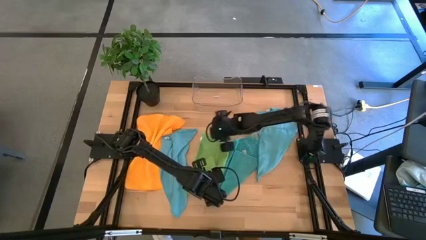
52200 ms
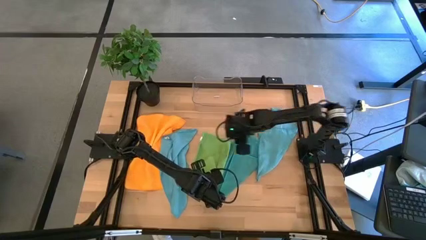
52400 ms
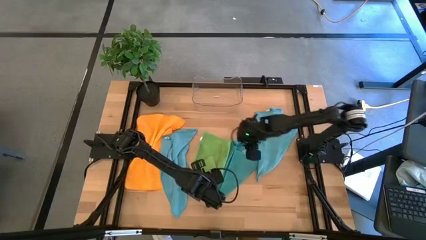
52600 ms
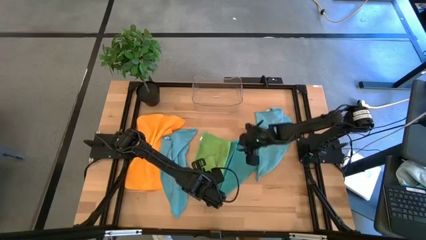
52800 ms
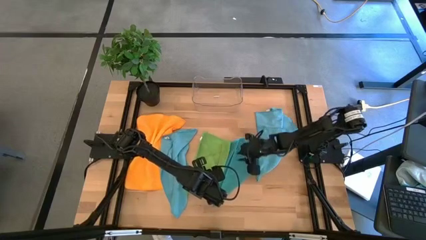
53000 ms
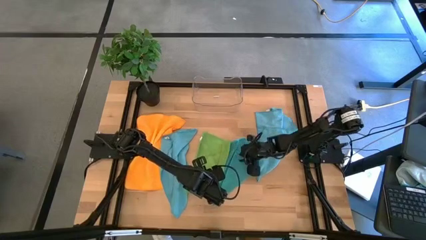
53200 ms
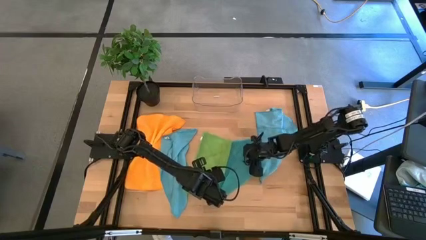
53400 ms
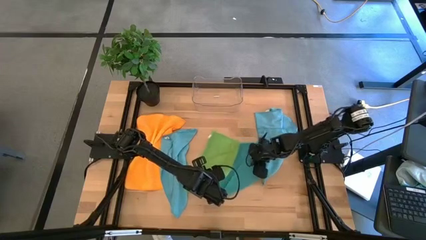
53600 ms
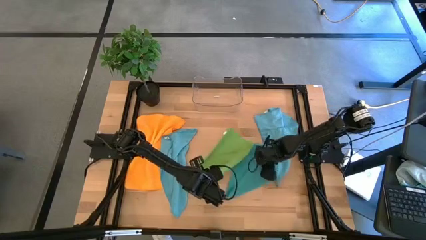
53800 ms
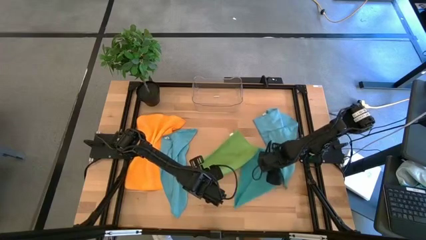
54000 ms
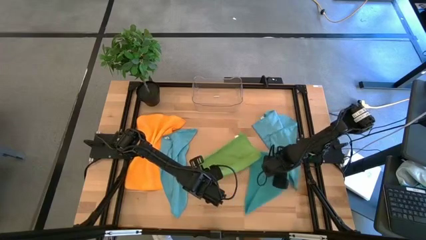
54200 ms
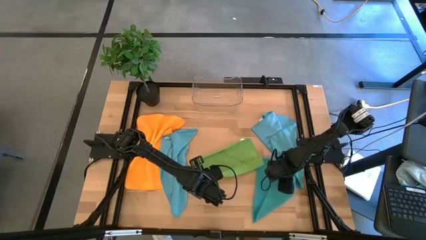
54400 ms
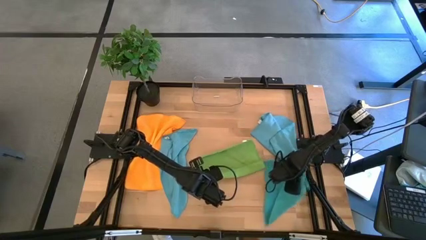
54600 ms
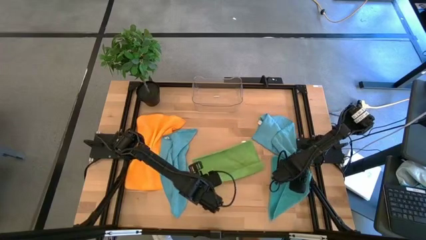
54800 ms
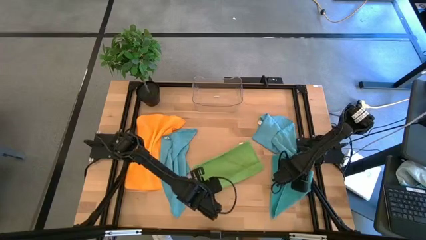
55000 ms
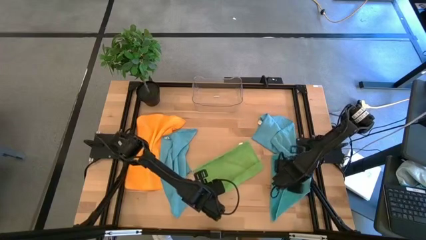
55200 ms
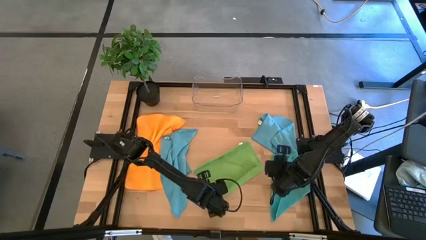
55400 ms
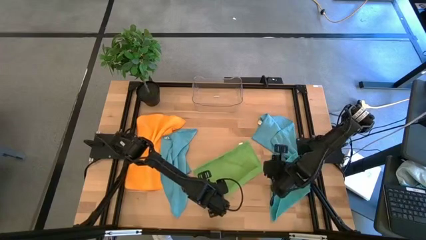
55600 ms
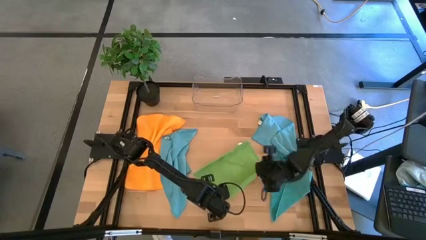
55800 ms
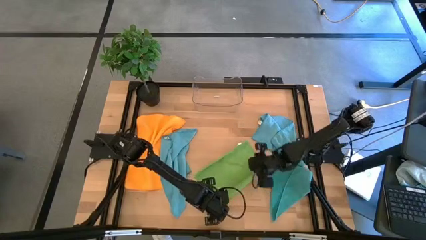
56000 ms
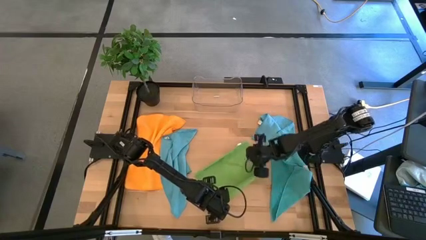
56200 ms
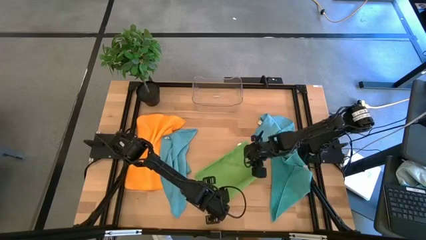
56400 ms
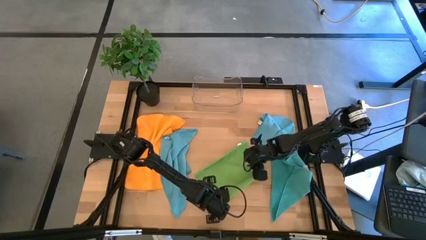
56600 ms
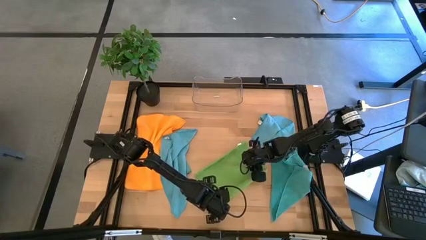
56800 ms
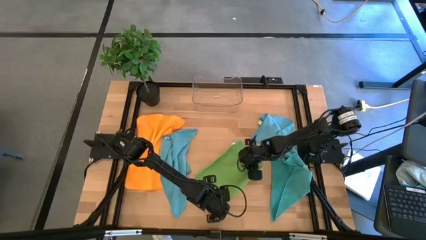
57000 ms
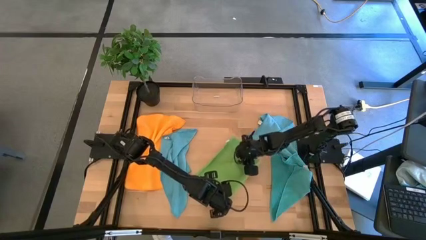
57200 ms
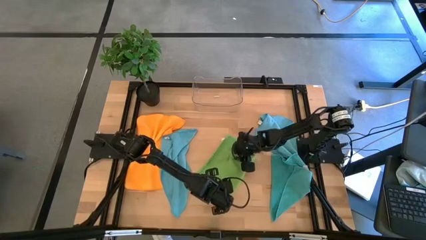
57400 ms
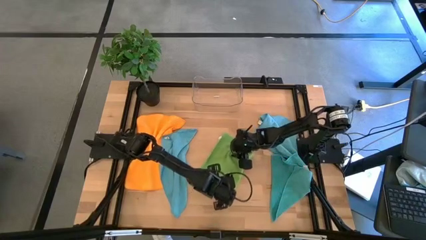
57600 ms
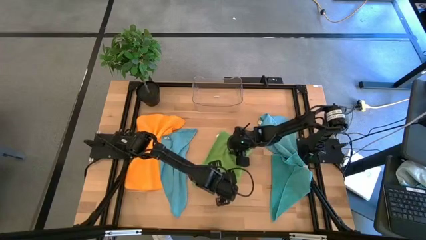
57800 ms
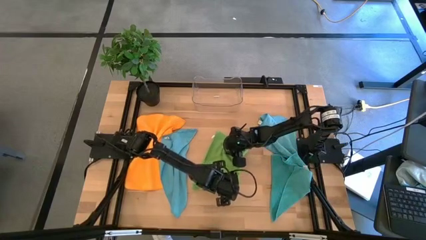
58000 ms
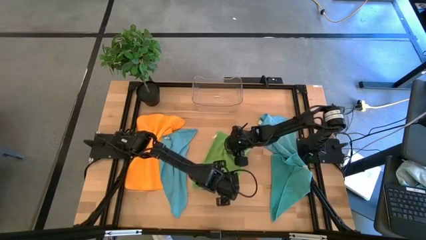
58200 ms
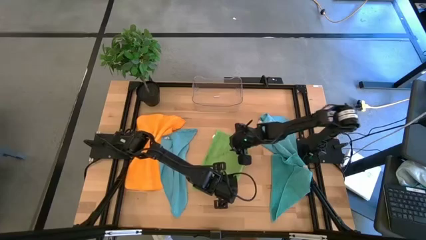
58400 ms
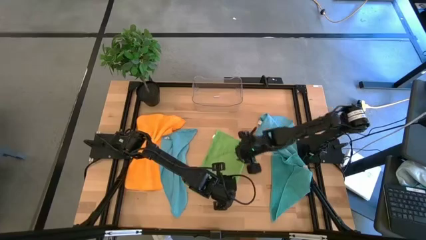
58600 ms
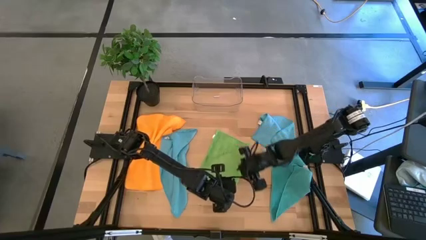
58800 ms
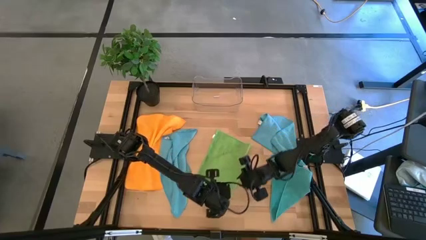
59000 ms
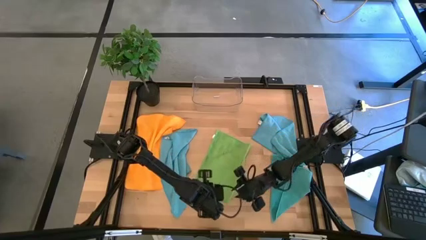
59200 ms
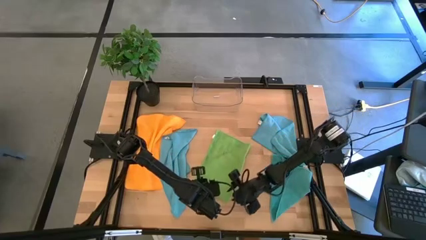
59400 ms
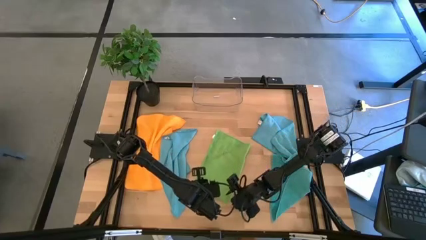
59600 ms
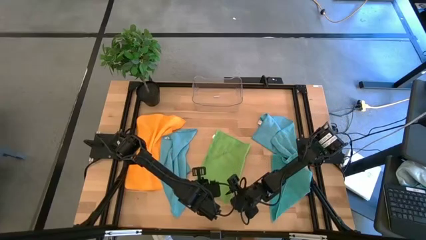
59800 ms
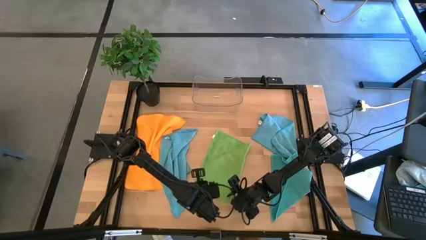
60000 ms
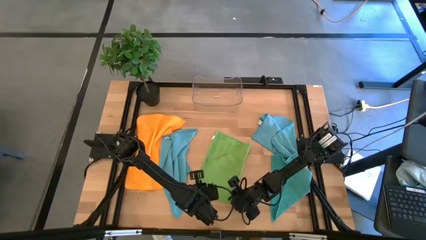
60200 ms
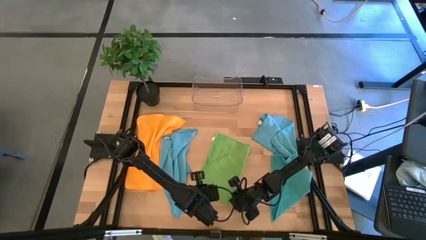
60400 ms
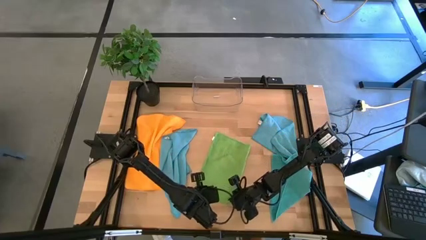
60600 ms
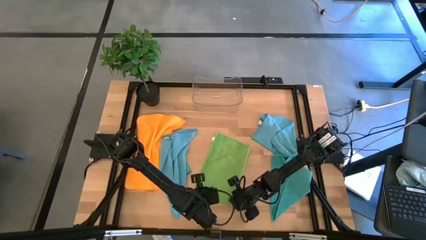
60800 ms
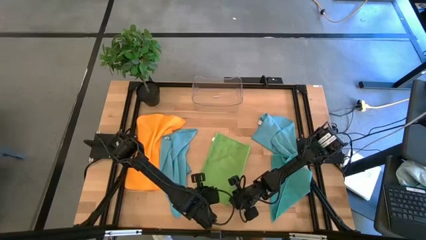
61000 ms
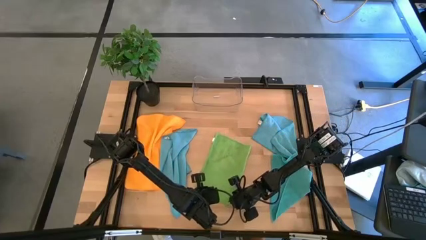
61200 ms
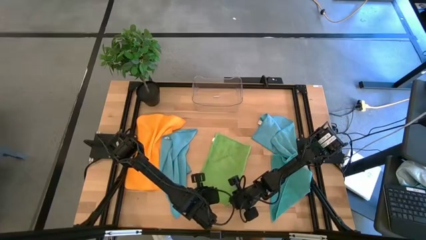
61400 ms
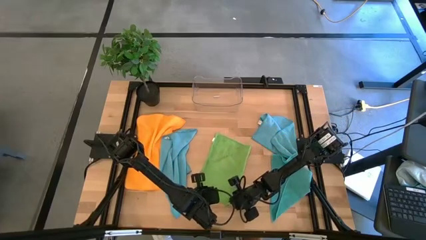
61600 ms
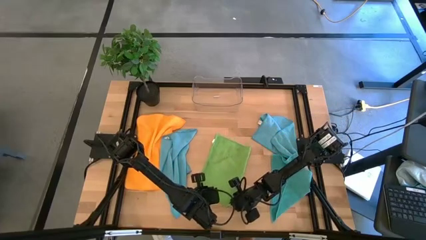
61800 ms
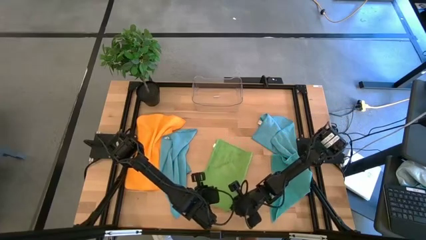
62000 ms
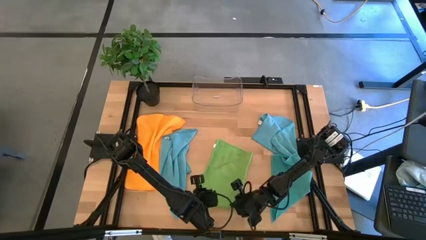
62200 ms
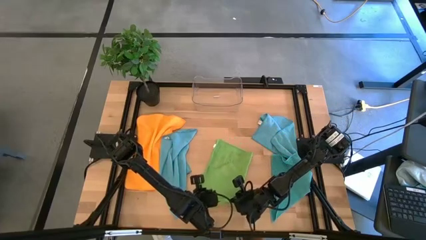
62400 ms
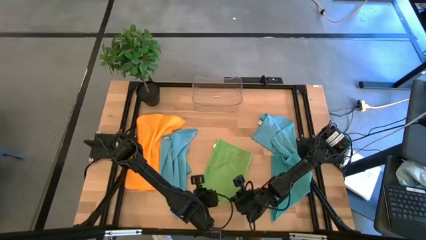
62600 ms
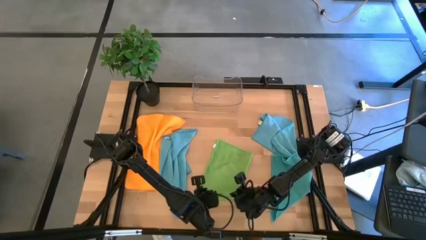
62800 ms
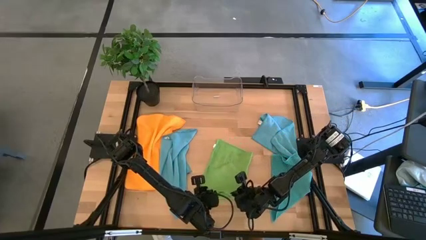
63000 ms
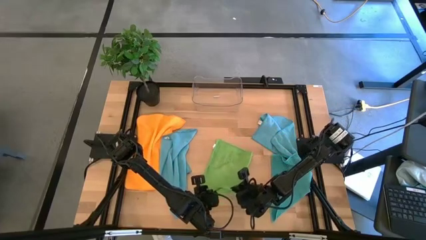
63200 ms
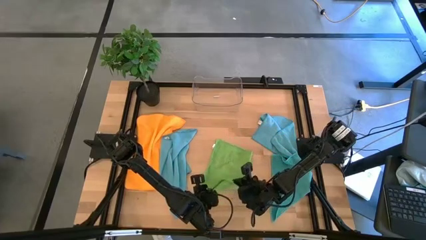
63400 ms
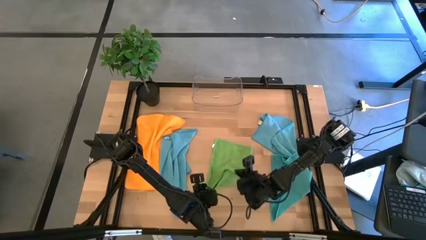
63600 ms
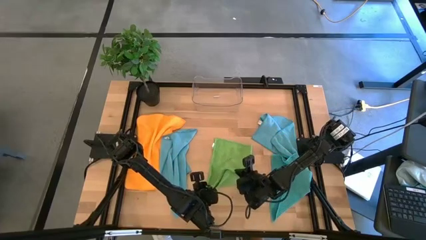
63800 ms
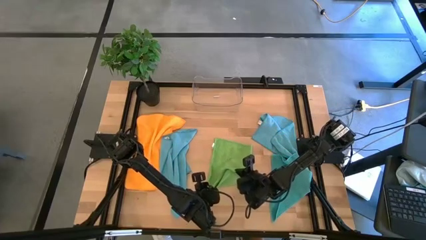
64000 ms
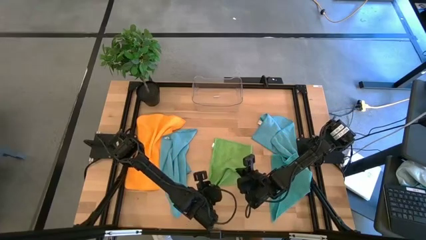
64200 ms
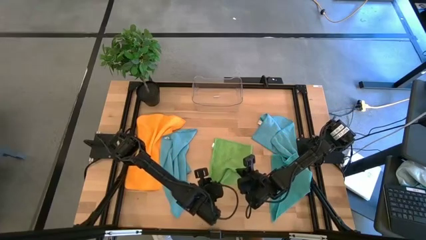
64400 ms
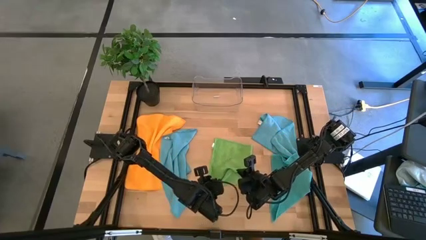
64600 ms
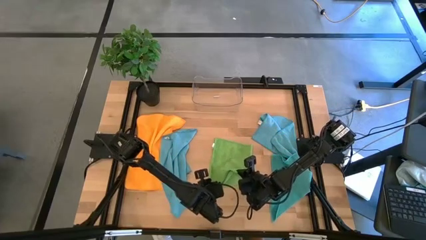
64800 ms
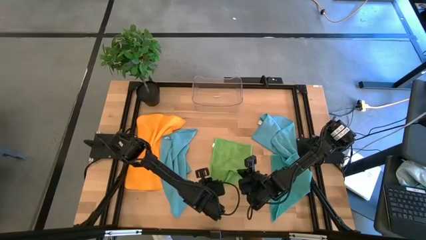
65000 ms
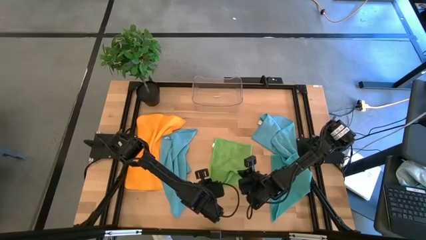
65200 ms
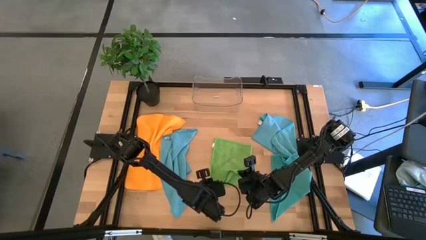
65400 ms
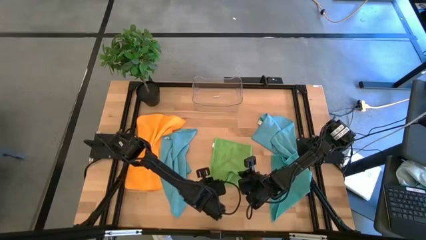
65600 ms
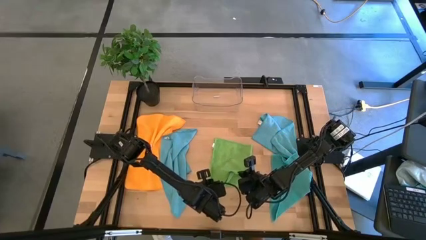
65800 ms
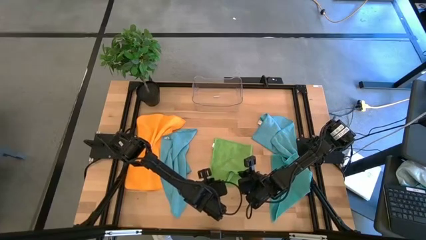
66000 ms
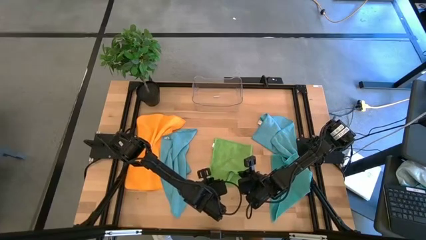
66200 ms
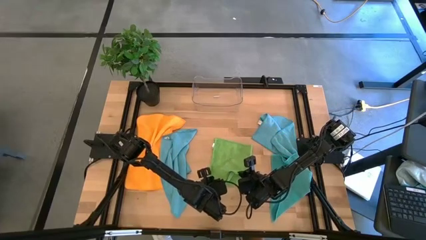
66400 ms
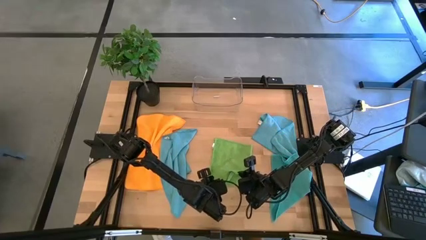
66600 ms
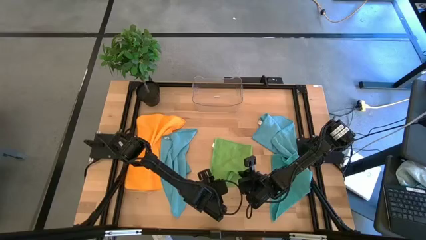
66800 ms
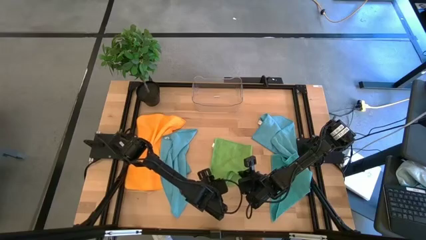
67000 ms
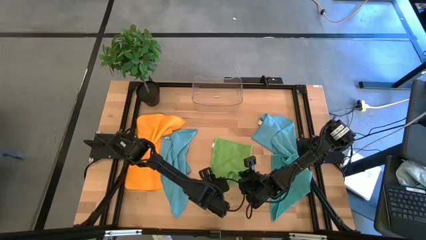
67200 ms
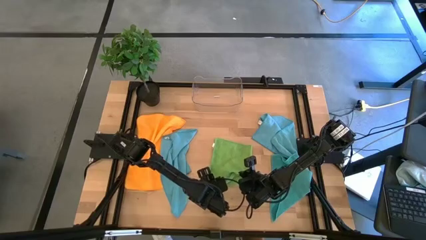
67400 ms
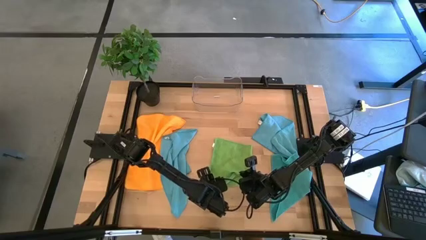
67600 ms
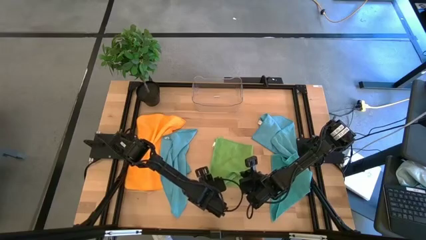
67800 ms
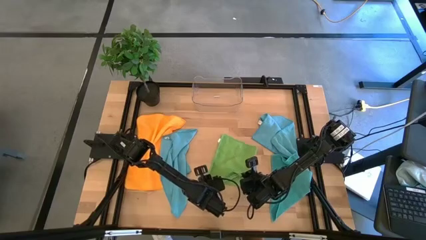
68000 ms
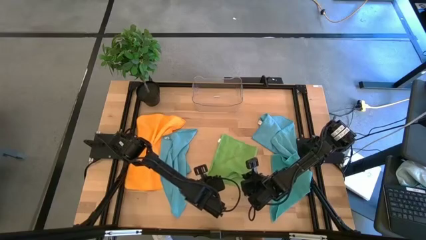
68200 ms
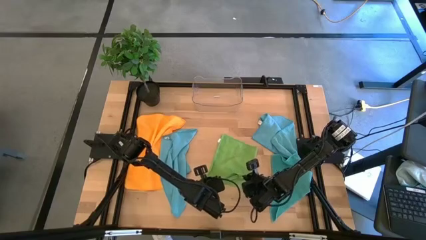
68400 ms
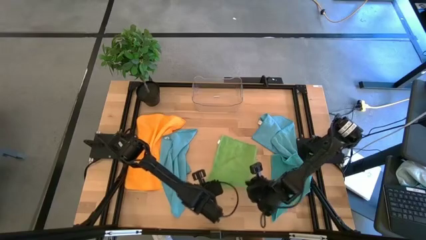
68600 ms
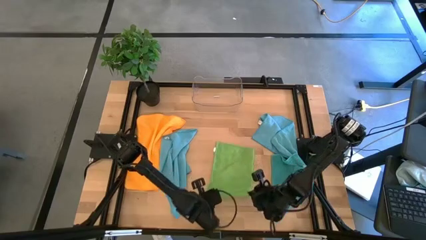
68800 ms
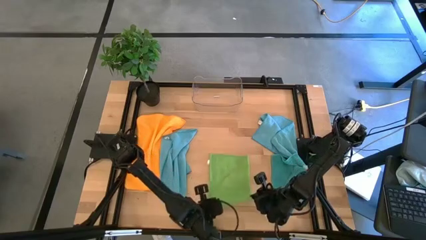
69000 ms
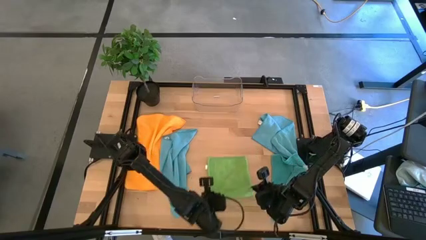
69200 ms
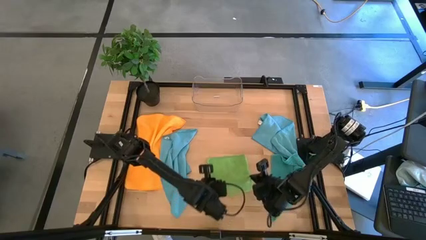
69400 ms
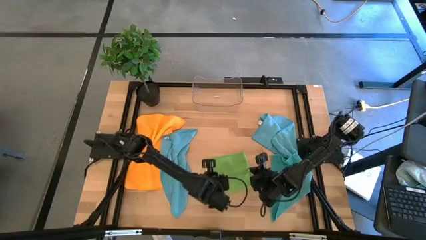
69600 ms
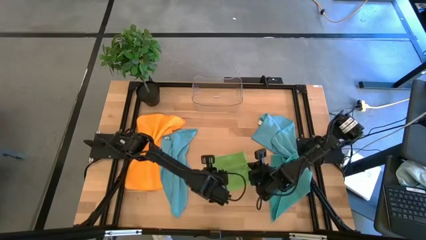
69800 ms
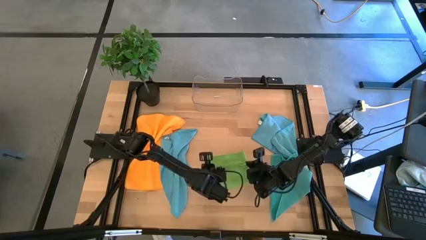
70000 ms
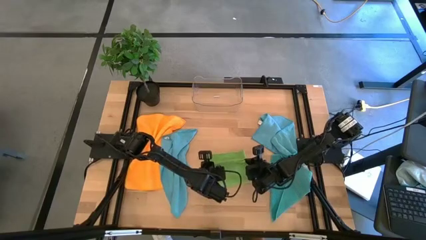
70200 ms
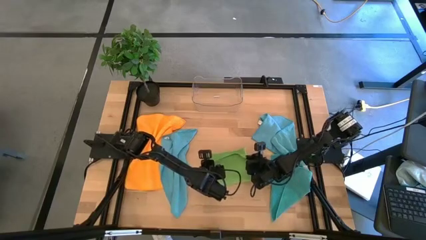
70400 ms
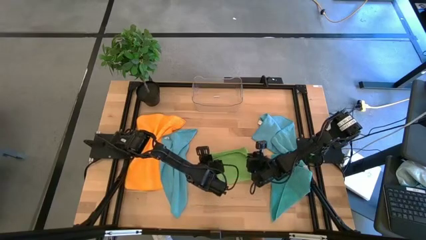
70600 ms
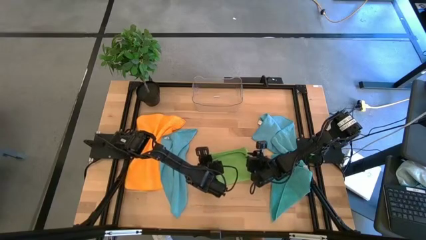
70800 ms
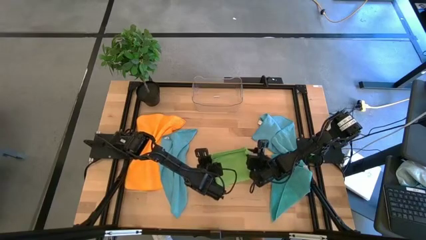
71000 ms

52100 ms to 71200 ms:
Task: Fold microfiber towels
Fold the green microfiber towel
